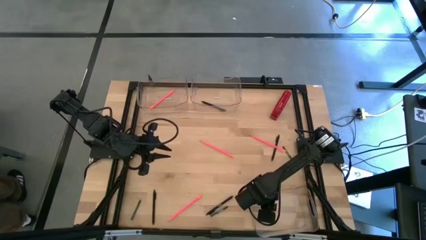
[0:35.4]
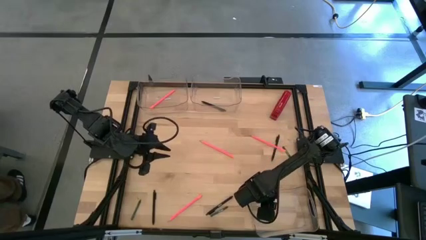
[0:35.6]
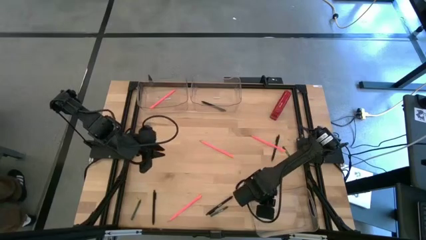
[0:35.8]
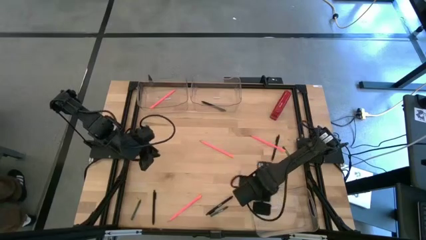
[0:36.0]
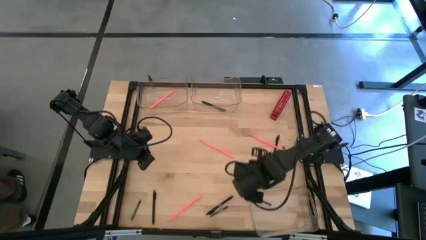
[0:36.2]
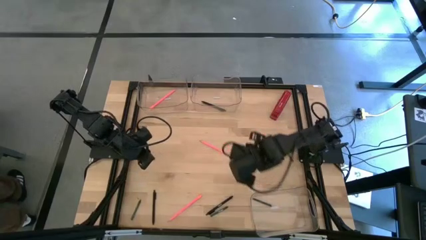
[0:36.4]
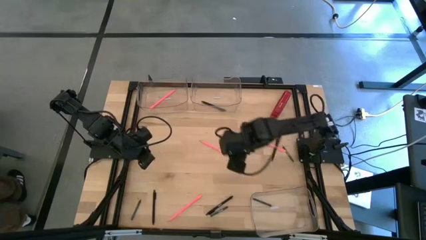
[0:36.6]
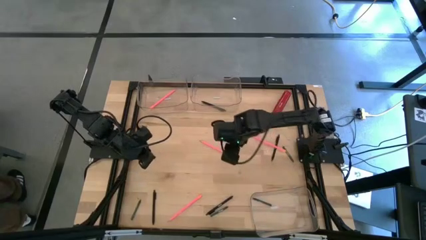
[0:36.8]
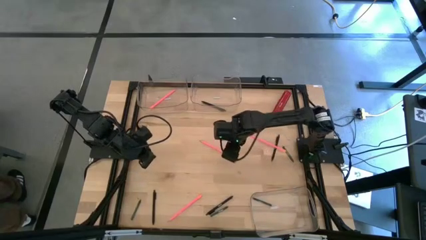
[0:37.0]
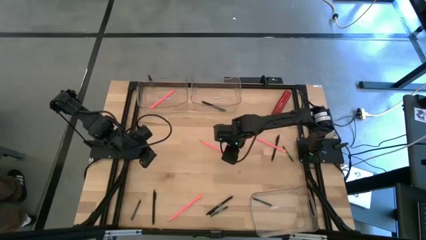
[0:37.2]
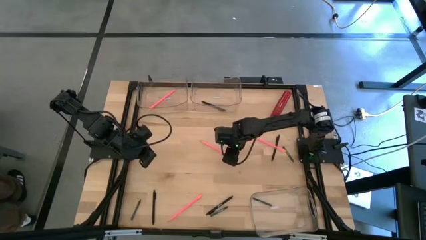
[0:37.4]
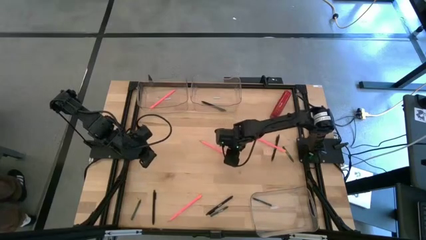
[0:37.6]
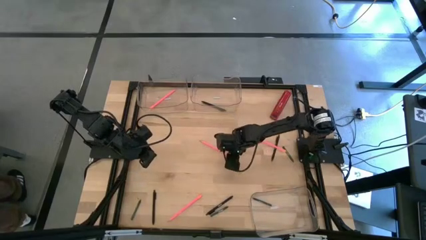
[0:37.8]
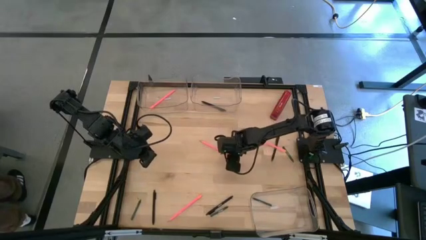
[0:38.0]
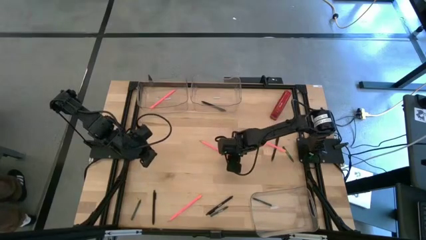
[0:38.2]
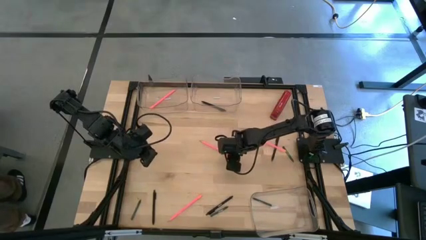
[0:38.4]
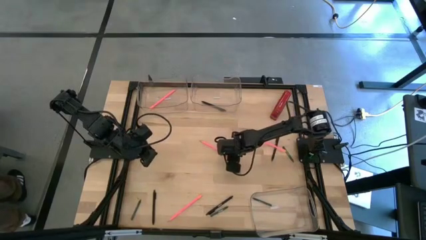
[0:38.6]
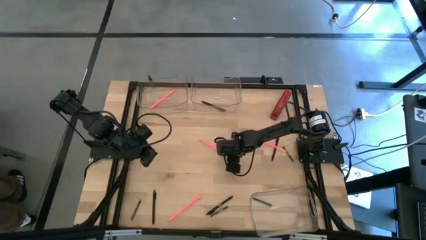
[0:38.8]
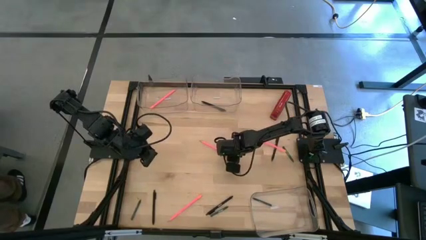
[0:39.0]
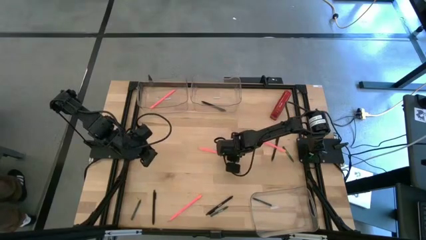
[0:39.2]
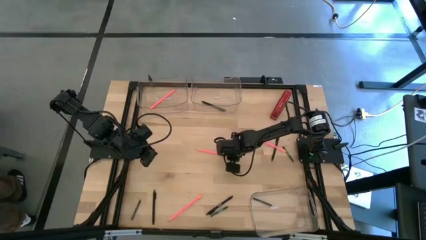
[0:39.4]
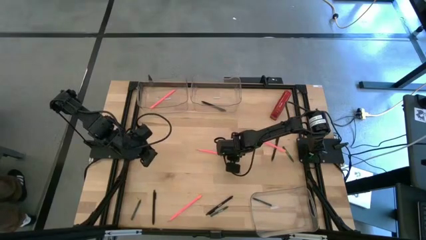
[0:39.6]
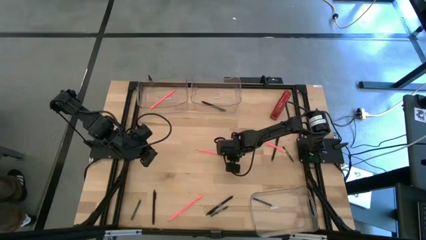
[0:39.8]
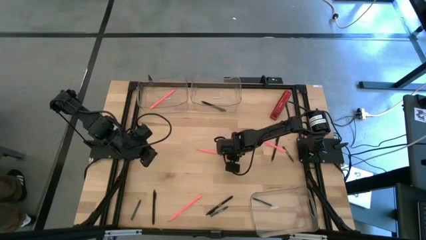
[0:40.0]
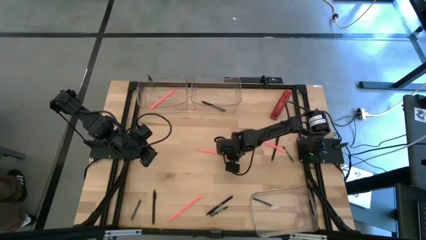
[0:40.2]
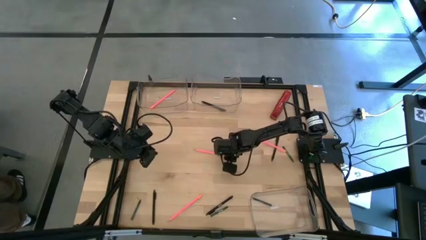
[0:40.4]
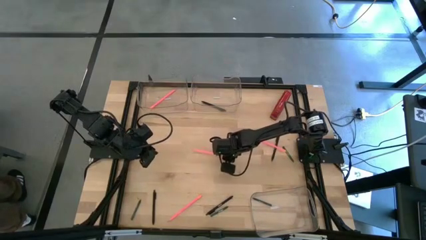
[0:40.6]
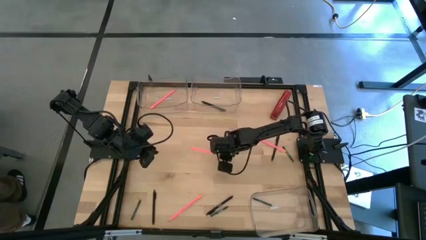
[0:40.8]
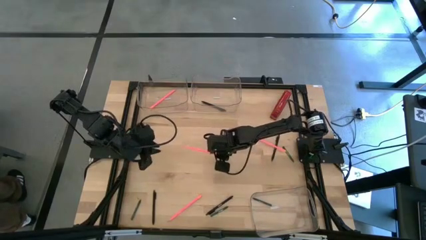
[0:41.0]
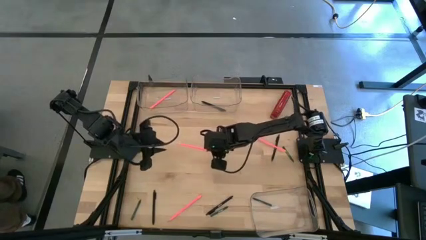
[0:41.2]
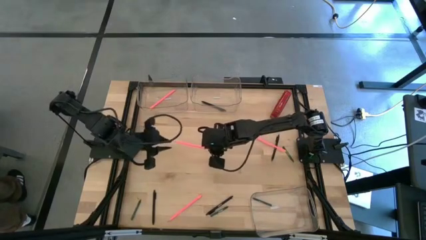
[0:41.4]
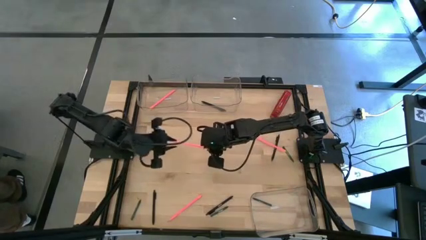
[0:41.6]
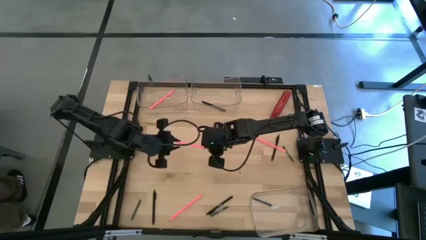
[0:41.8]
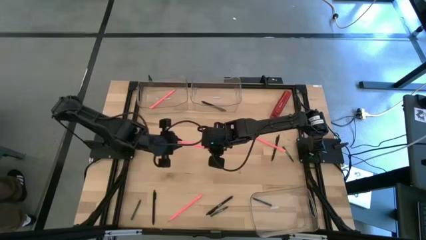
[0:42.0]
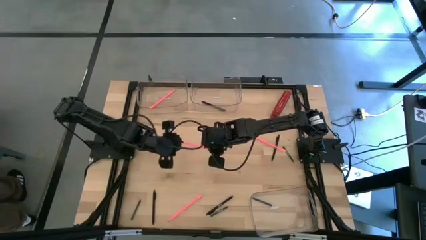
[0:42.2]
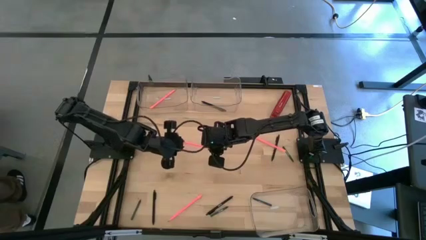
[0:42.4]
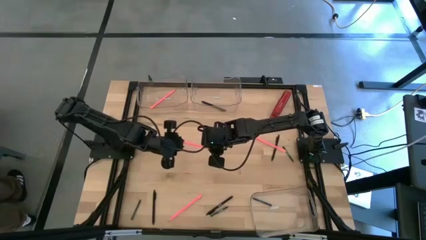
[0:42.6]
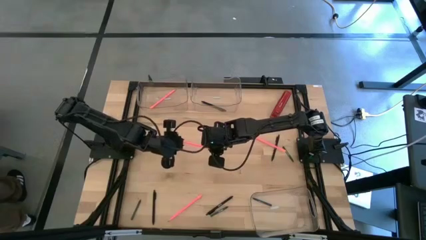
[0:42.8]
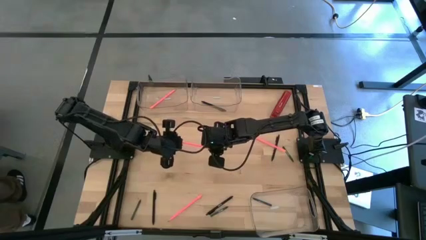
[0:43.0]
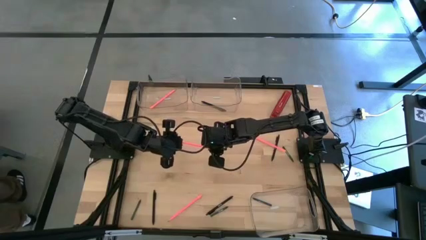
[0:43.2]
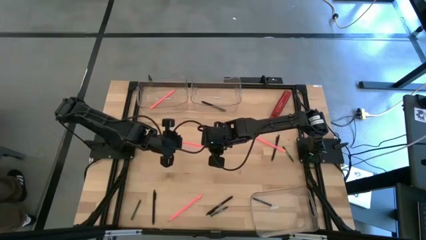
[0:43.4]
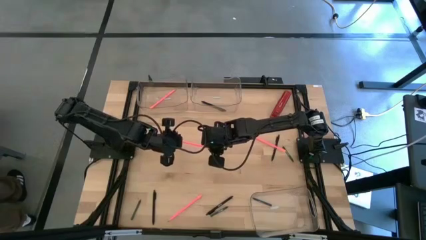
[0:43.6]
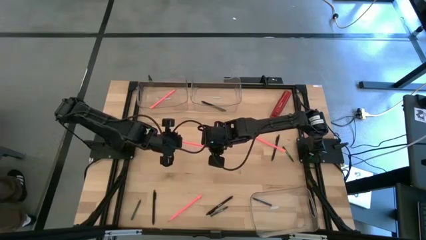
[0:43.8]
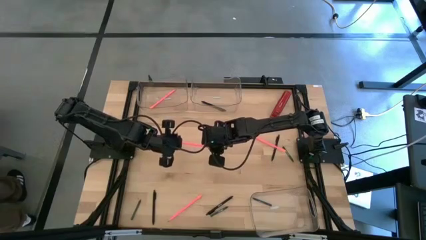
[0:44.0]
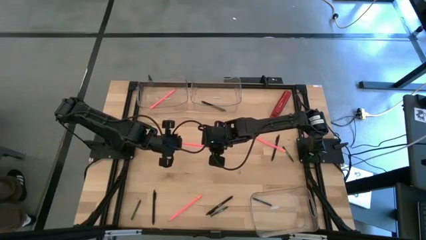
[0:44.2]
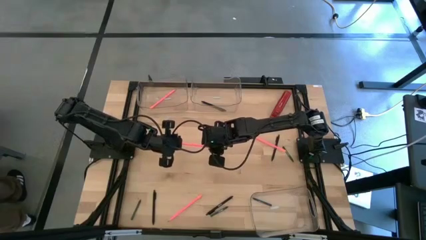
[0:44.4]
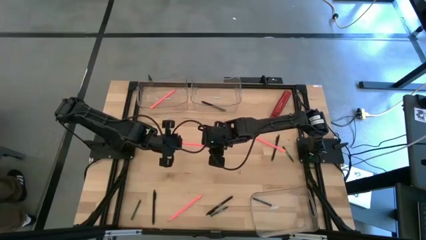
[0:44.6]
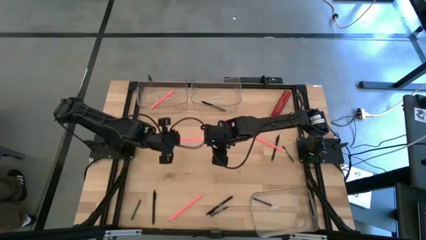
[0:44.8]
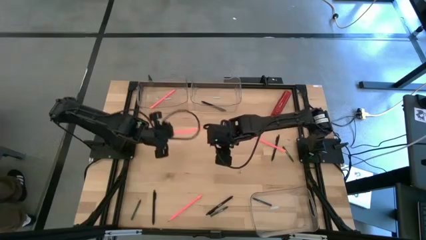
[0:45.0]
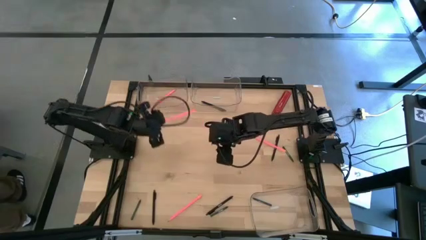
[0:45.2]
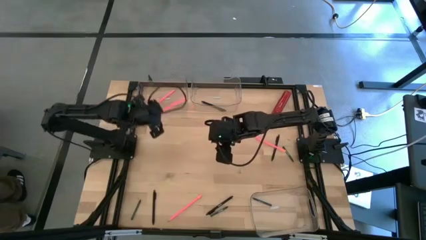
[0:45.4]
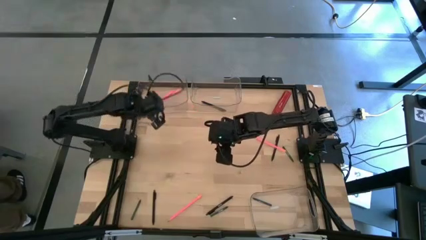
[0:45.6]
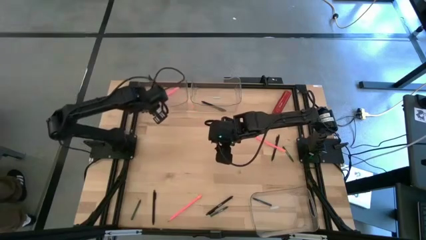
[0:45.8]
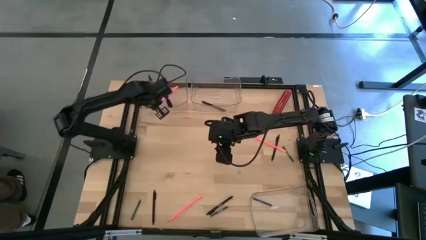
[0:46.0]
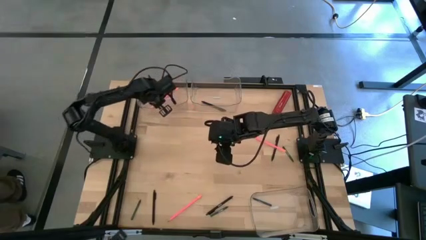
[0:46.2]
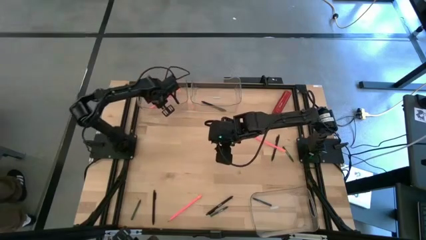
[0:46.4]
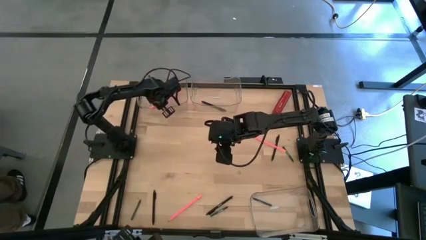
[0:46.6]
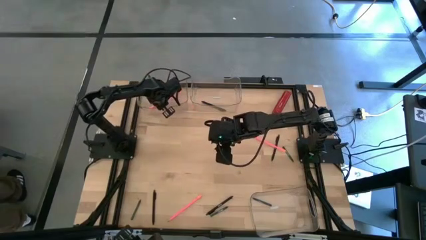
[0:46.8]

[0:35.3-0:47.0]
Task: Sort crayons/erasers/pens/pencils in bins
Put the pink pencil into the top left transparent bin

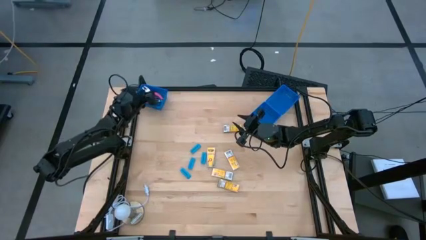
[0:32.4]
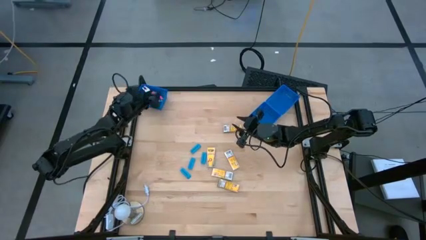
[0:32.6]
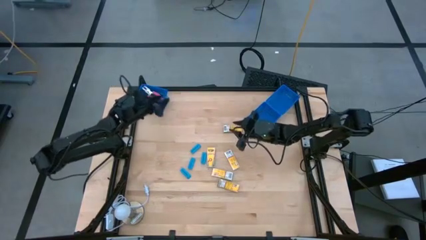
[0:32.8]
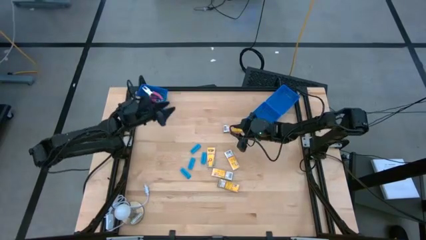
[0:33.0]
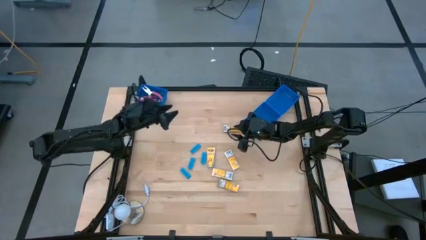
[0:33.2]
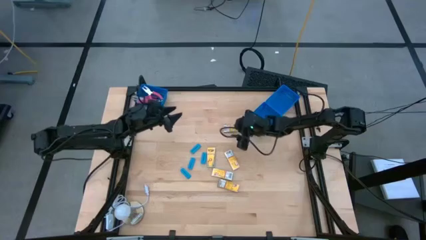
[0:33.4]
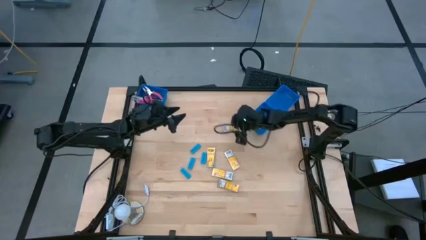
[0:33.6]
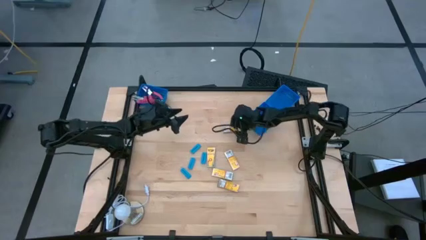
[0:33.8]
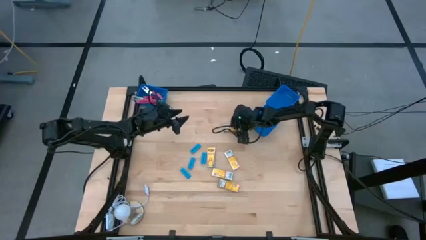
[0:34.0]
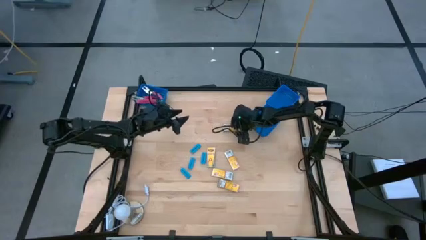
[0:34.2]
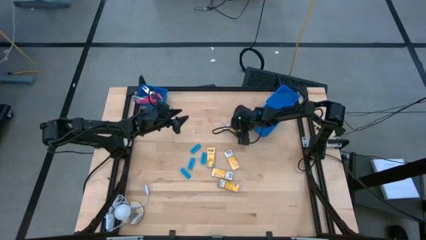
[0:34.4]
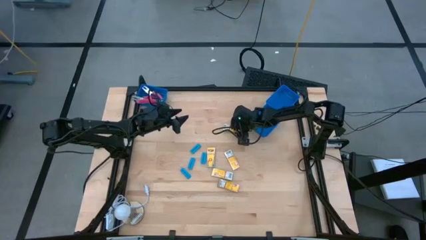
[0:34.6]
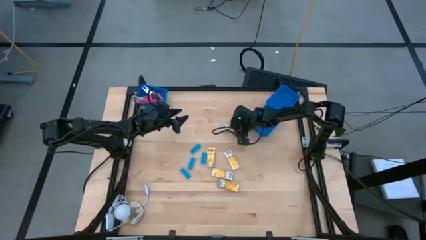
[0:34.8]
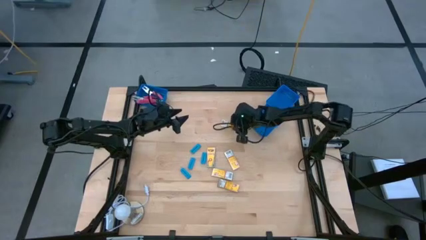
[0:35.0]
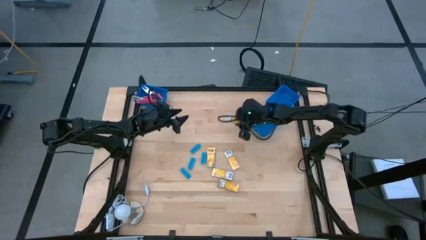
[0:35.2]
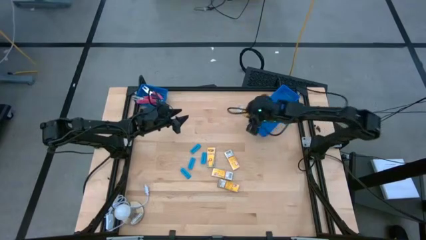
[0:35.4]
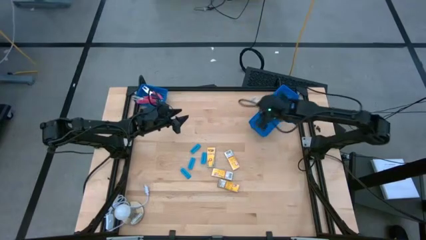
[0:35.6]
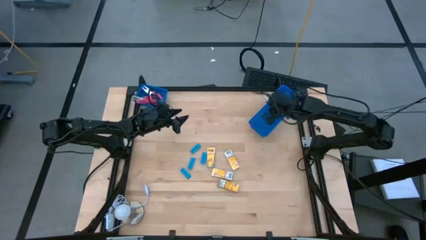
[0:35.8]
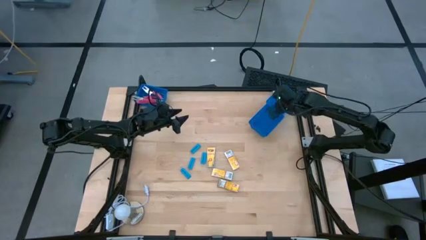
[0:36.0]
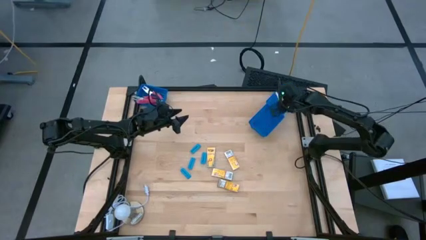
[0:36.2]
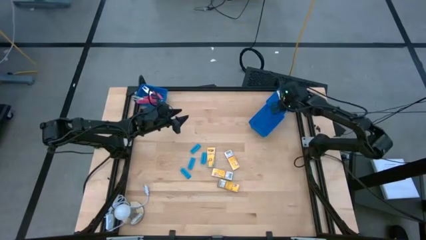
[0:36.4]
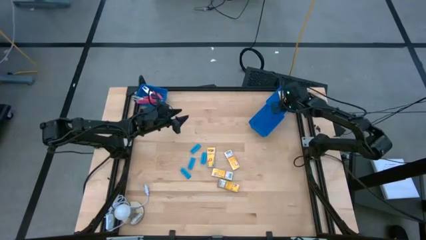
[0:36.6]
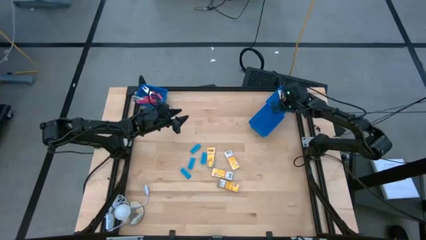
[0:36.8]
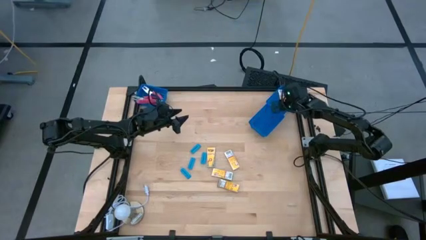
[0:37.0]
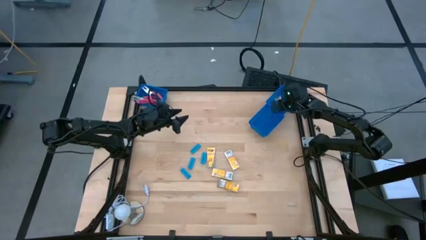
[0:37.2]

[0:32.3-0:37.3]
Task: Pick & Place School Supplies
Put the yellow crayon box into the top right blue basket
